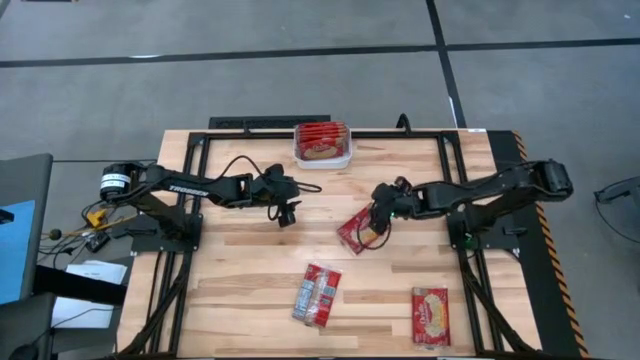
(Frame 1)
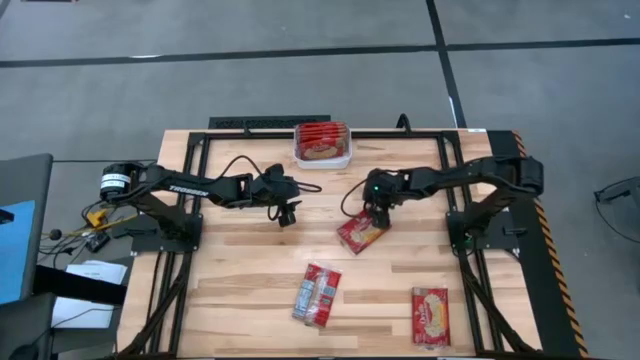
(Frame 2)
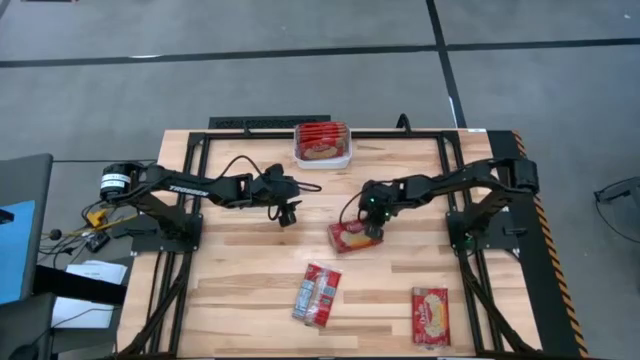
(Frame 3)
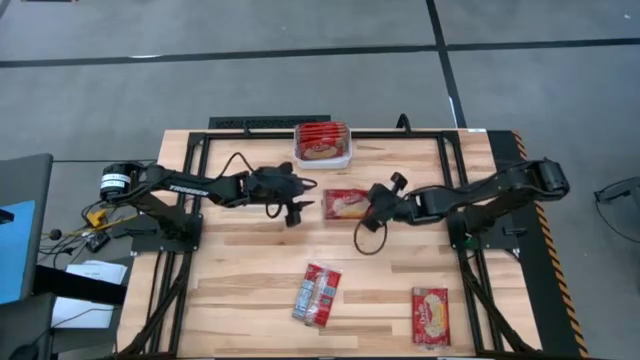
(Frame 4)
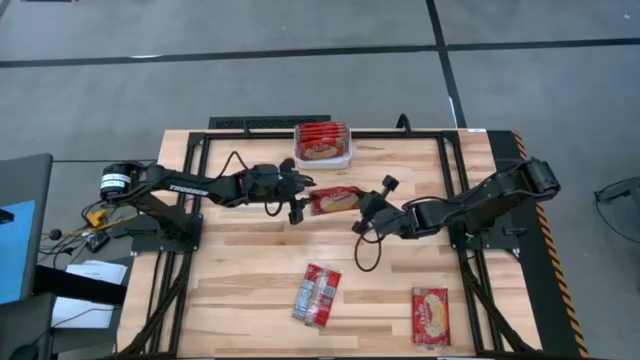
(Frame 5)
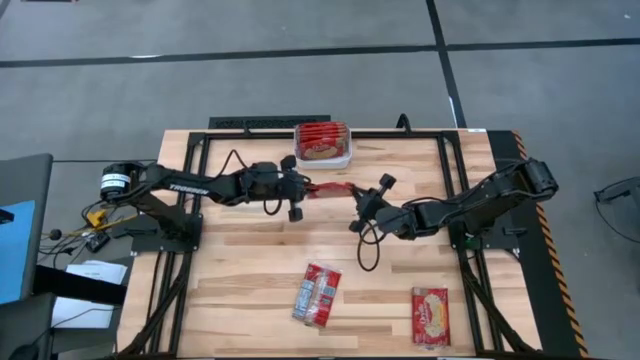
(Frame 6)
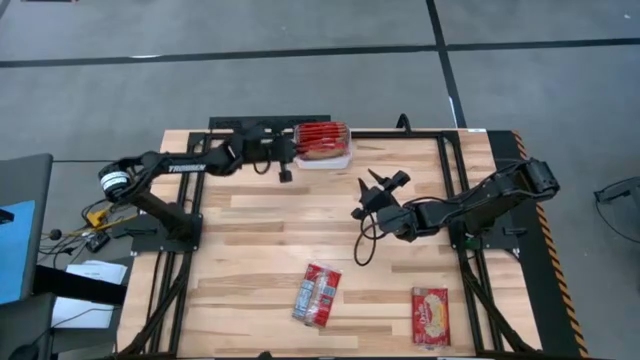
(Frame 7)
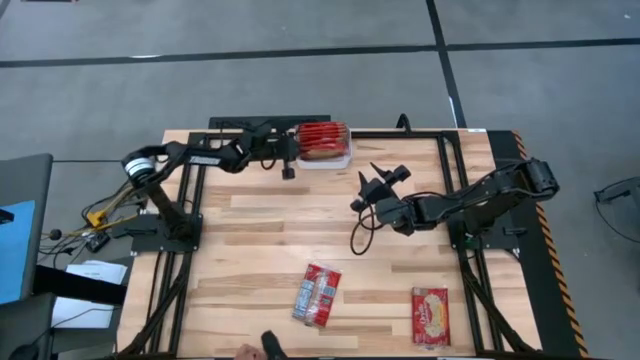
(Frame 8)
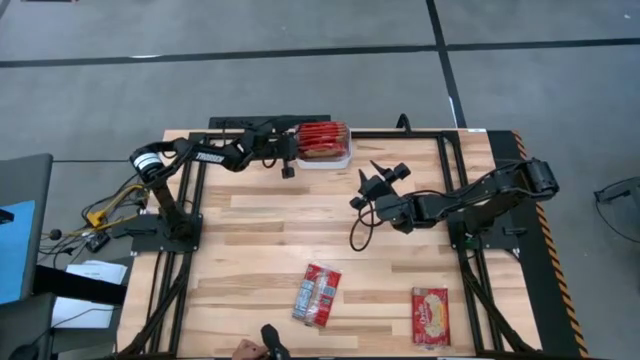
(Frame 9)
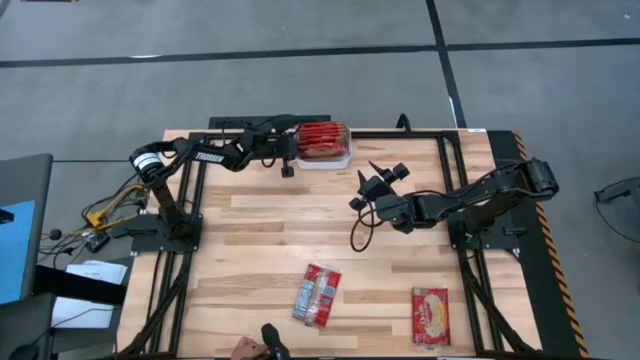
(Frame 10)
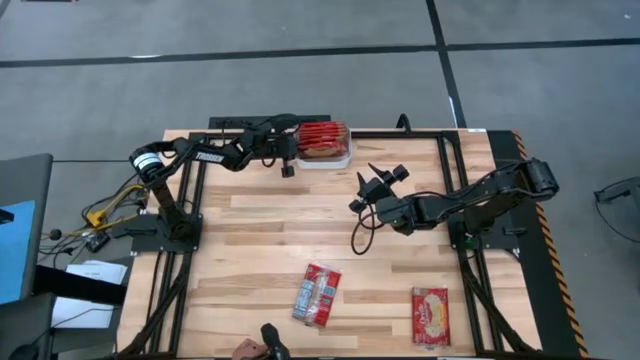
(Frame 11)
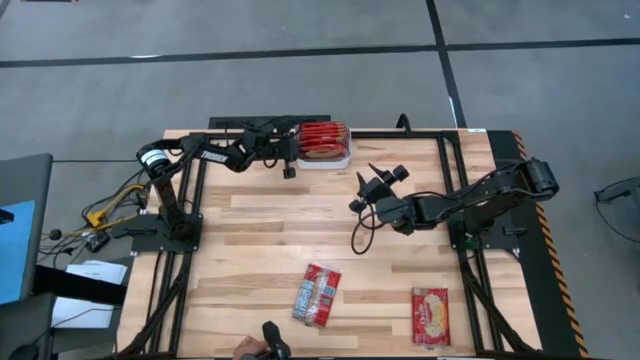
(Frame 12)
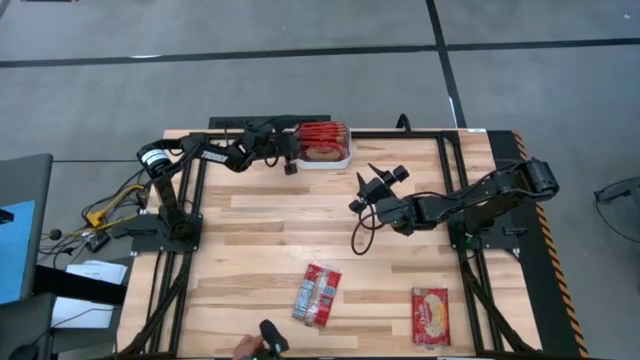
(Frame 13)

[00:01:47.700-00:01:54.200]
Task: Sort popcorn bags into baskets
Put the red popcorn bag into the white bin

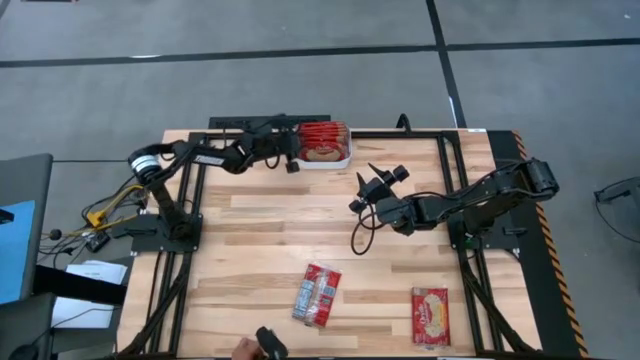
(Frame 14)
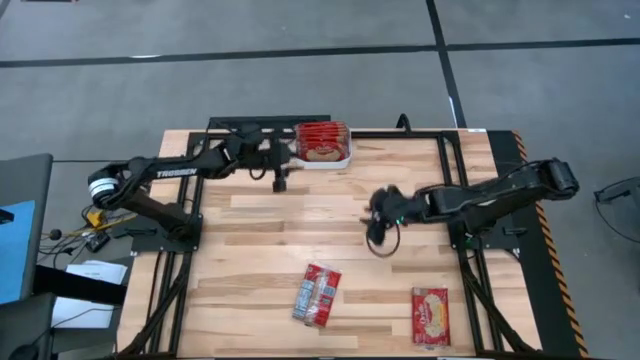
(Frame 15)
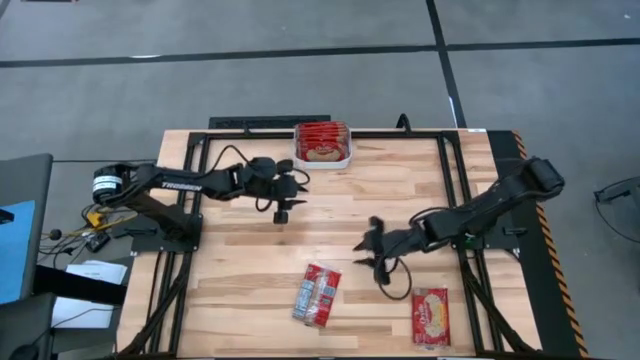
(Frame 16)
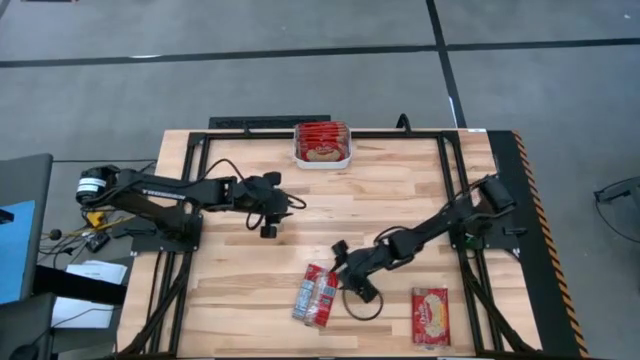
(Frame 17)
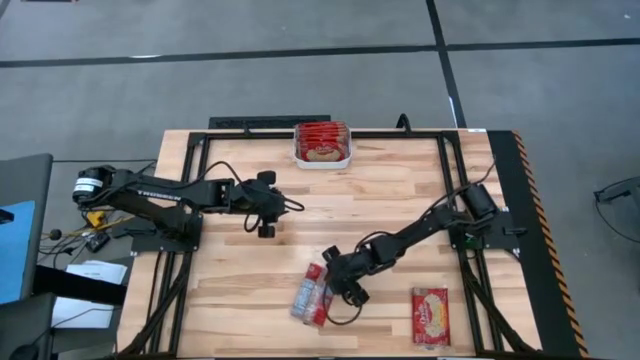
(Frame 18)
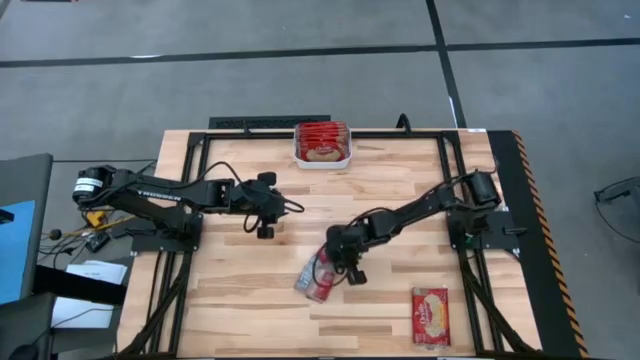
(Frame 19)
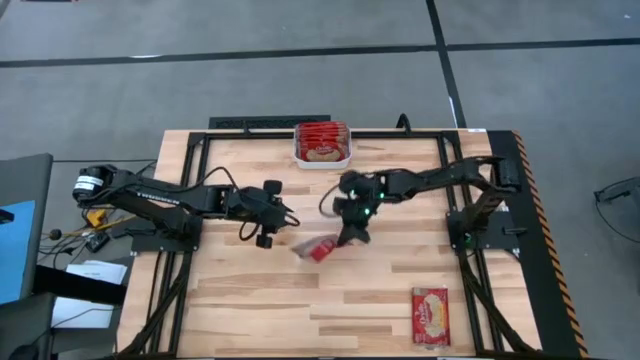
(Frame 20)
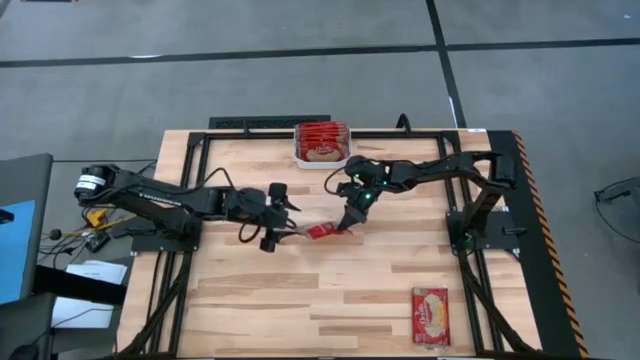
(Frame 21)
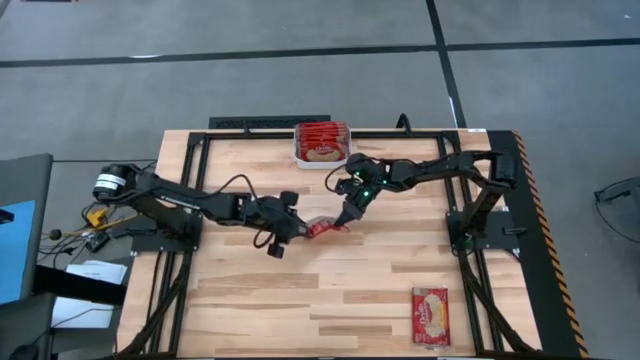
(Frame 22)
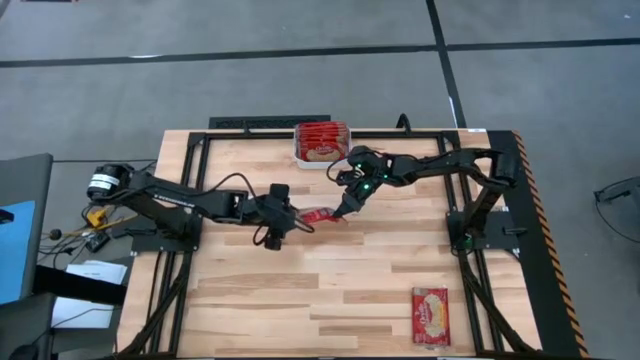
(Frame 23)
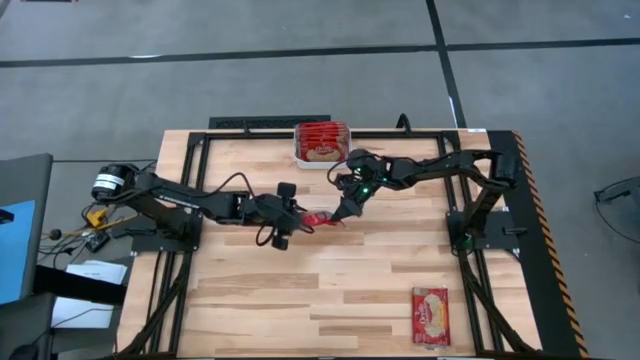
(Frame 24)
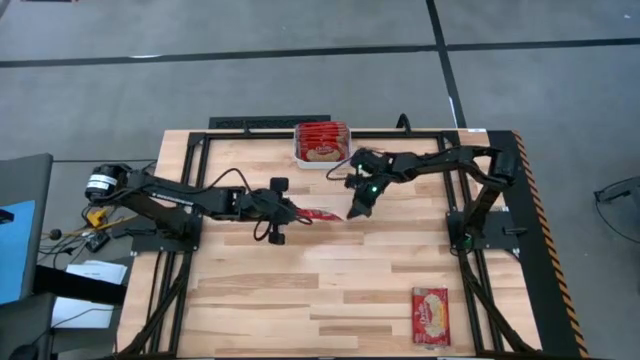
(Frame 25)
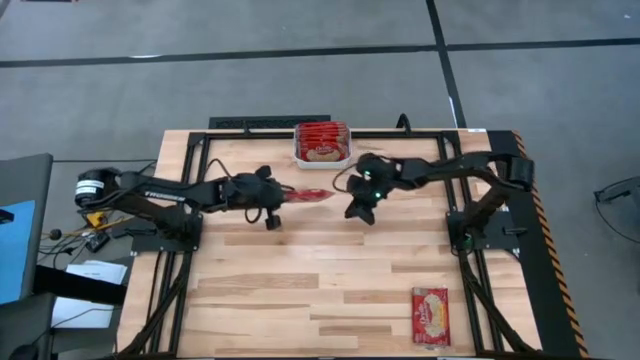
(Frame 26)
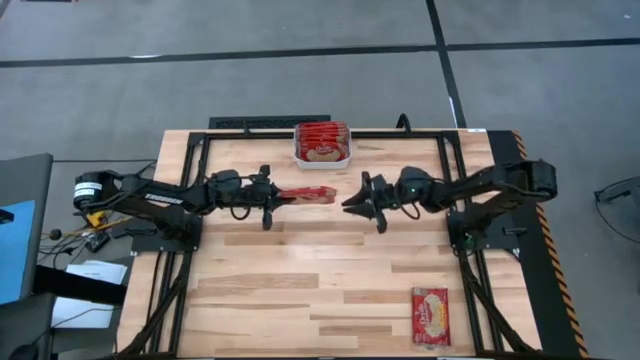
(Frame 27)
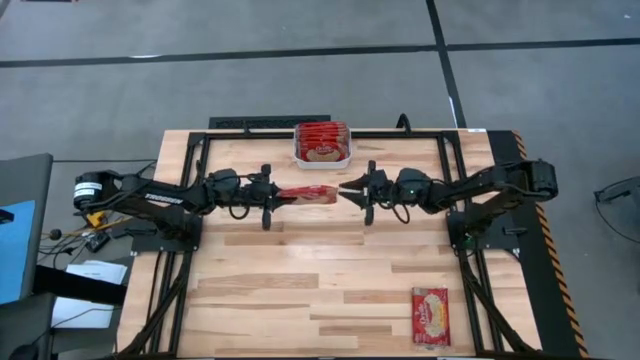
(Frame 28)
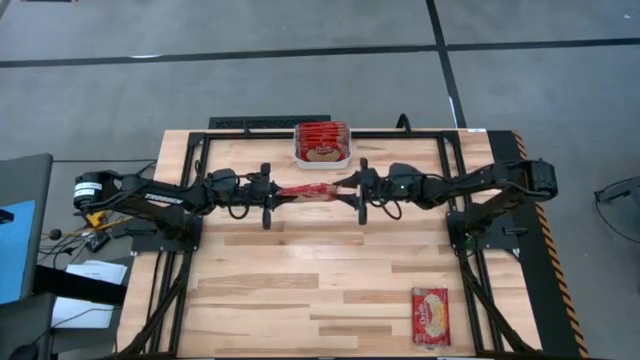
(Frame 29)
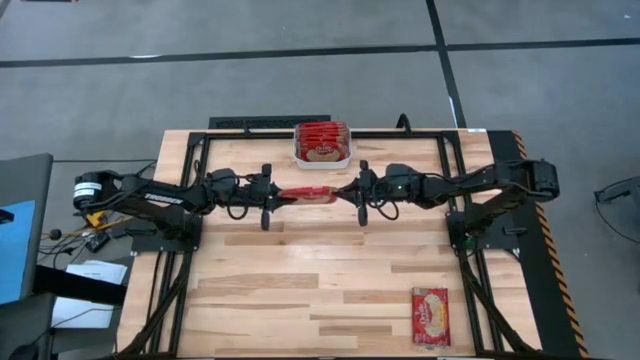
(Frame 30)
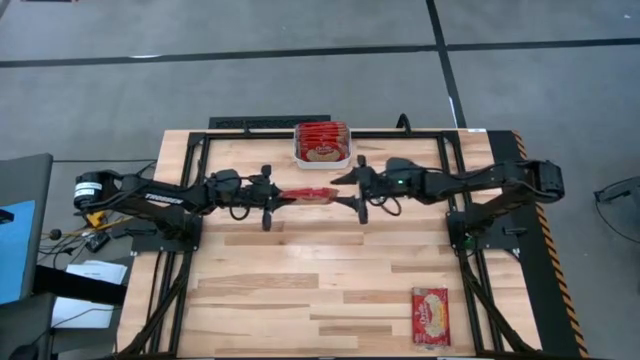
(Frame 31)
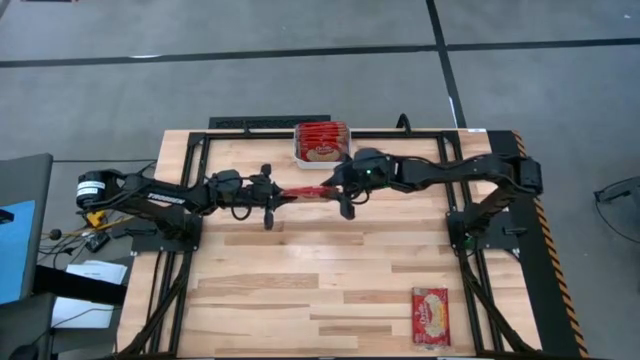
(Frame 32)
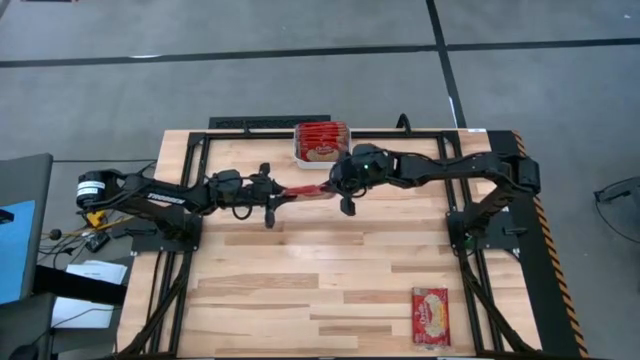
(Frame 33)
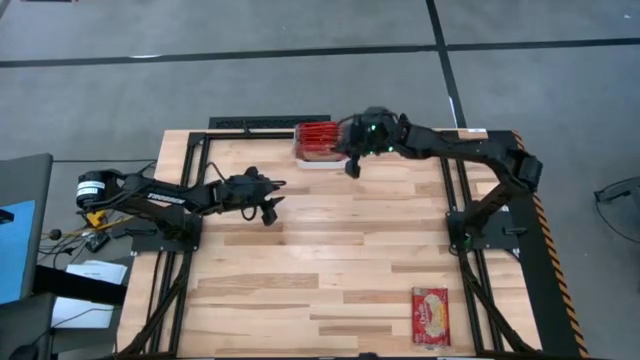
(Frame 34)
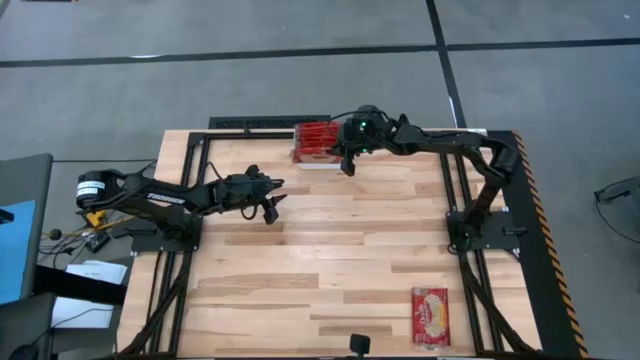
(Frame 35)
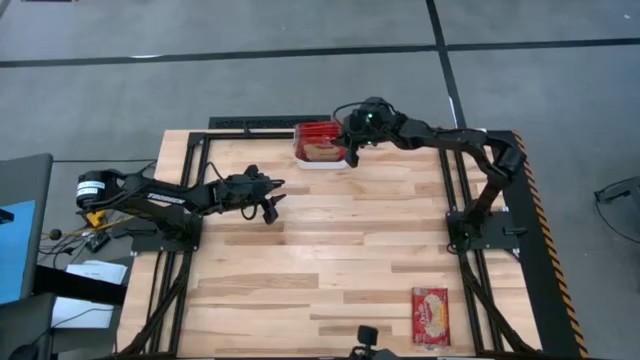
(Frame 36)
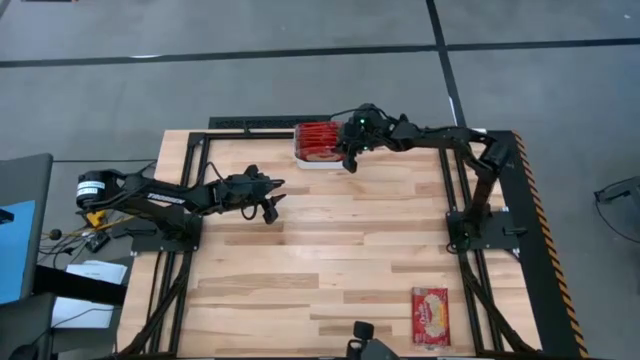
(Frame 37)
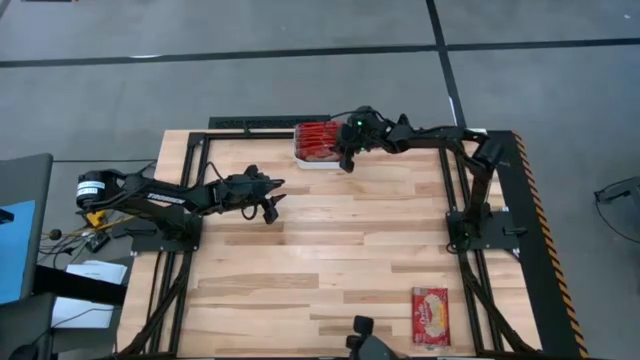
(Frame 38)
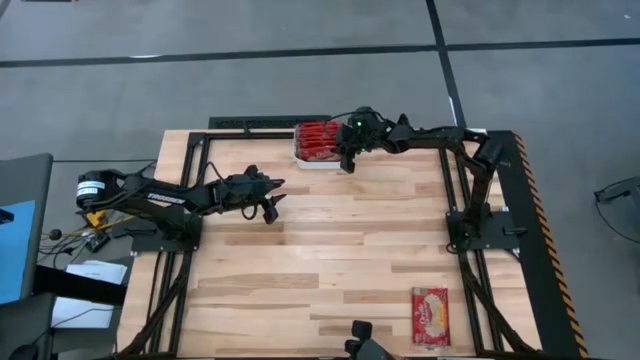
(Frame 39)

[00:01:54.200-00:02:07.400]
Put the red popcorn bag into the white bin

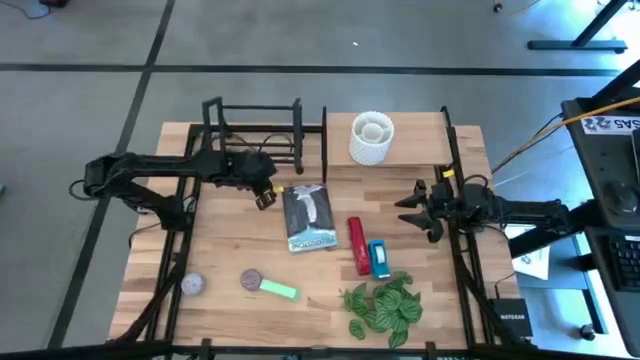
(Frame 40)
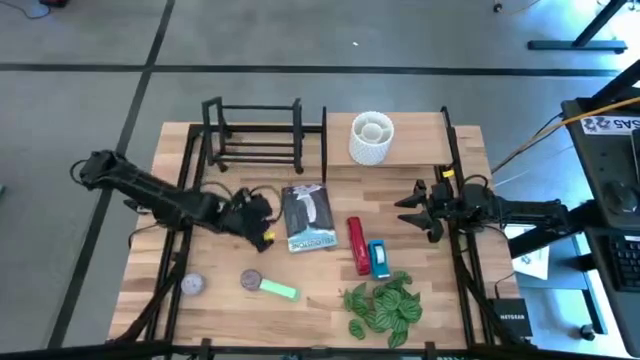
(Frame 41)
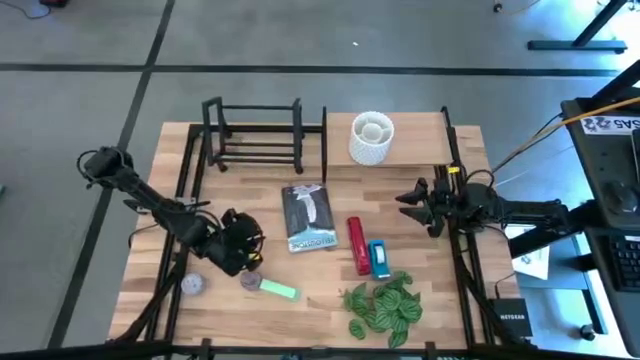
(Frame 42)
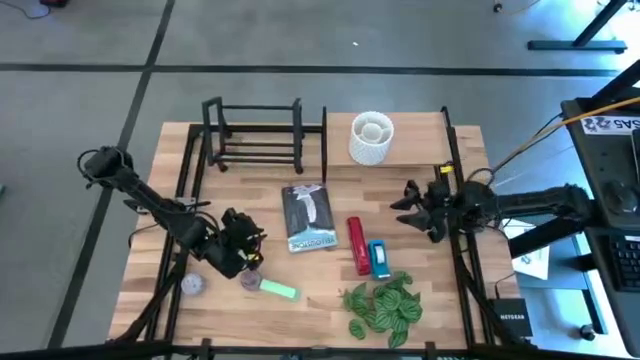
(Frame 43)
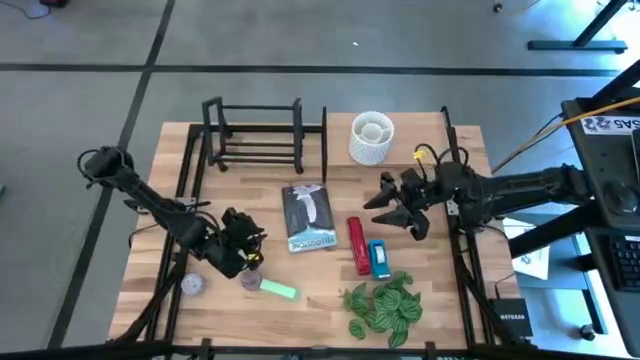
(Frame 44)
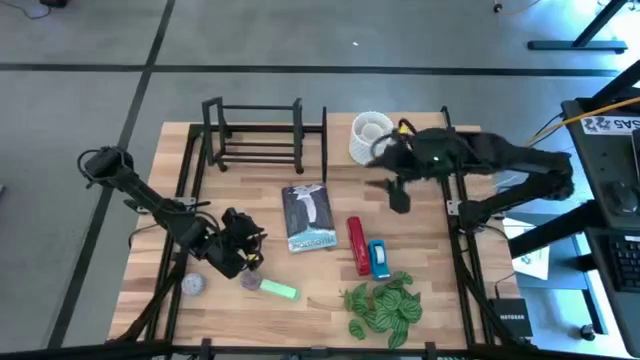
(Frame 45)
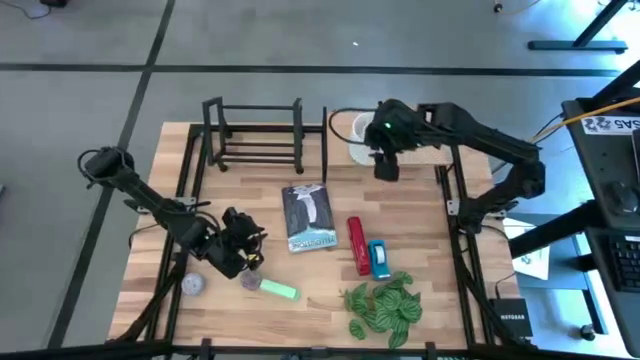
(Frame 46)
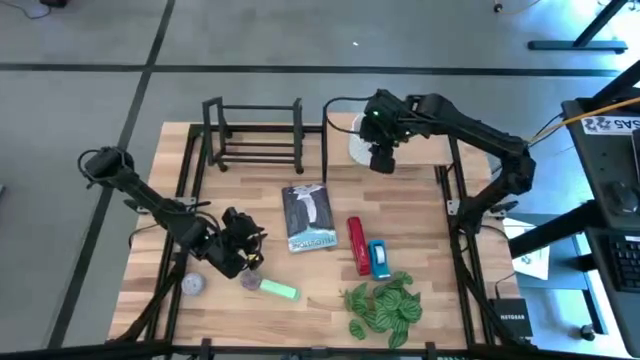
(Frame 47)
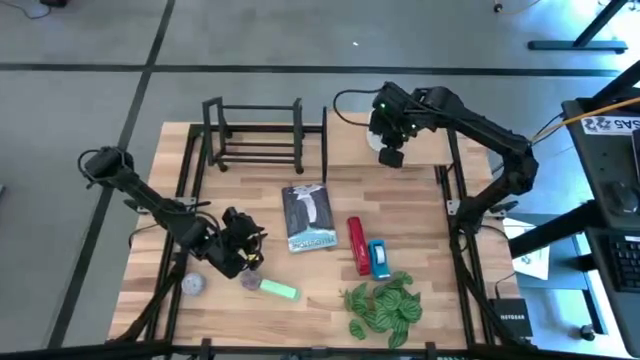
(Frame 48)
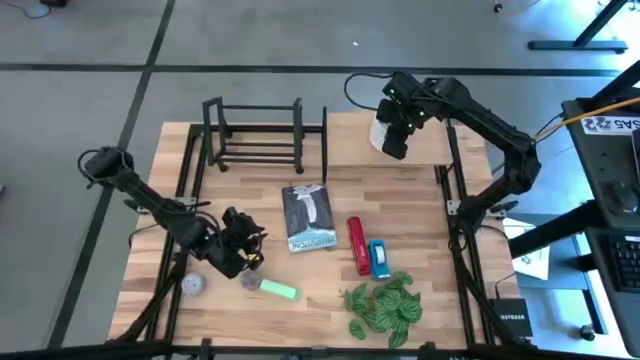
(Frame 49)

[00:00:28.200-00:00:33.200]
Task: Stock shelves
Adjust the white pencil holder on the shelf
